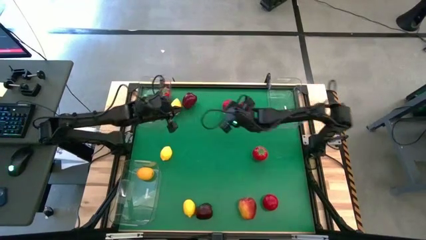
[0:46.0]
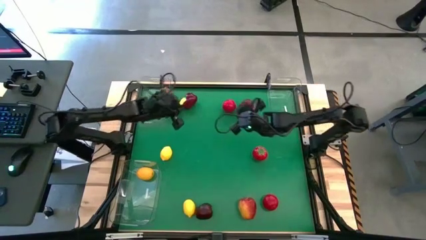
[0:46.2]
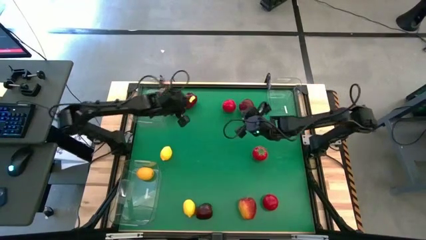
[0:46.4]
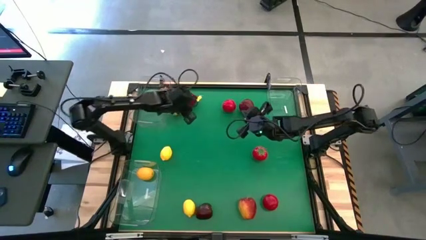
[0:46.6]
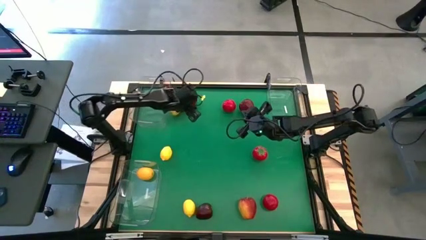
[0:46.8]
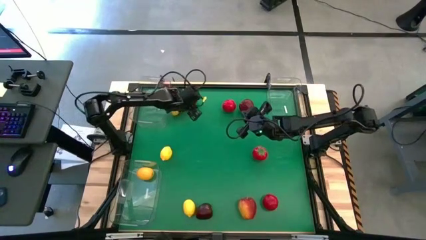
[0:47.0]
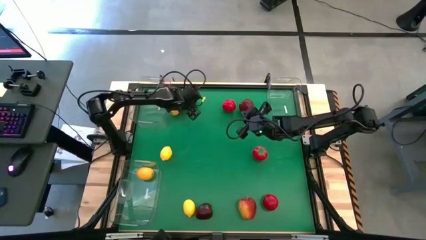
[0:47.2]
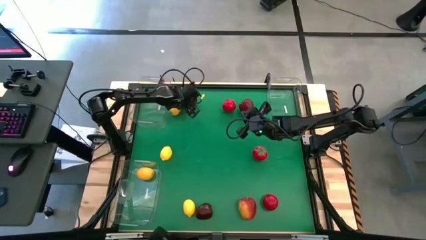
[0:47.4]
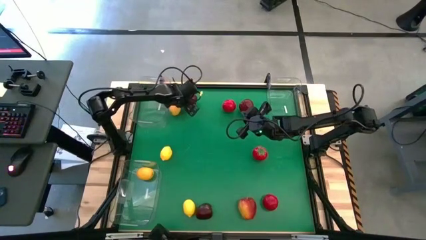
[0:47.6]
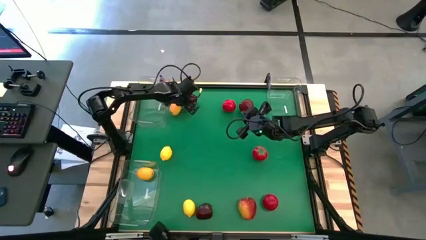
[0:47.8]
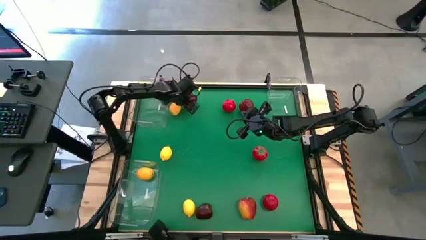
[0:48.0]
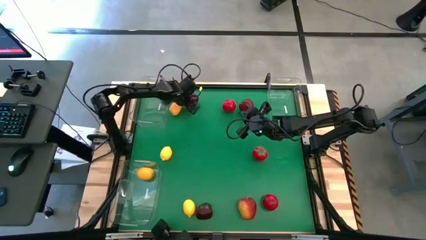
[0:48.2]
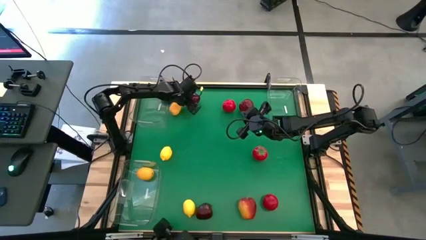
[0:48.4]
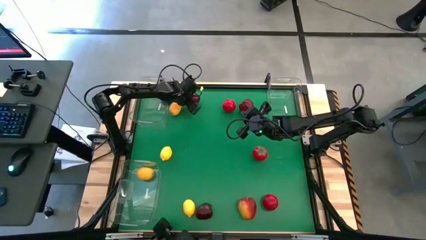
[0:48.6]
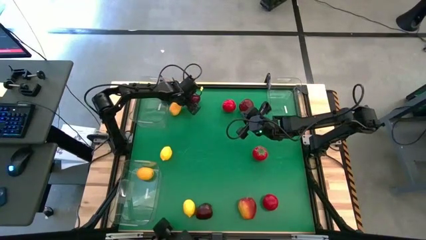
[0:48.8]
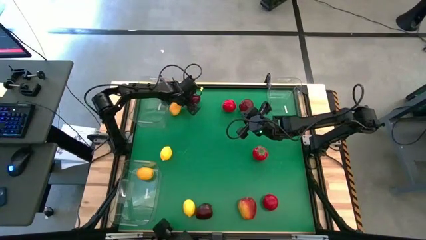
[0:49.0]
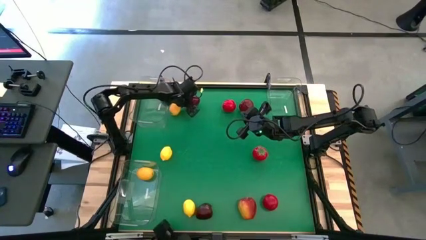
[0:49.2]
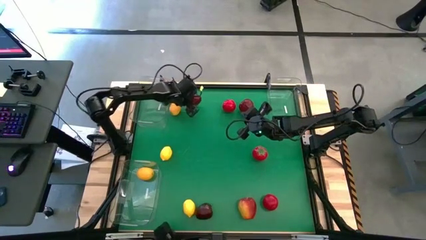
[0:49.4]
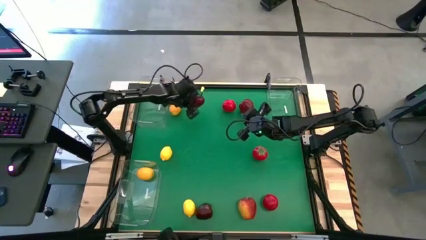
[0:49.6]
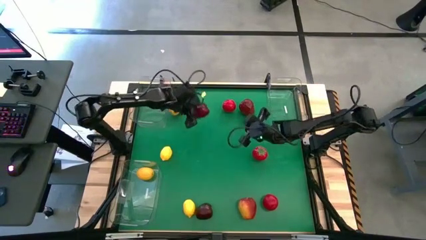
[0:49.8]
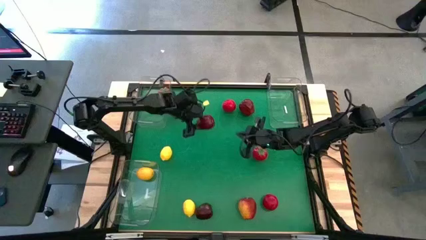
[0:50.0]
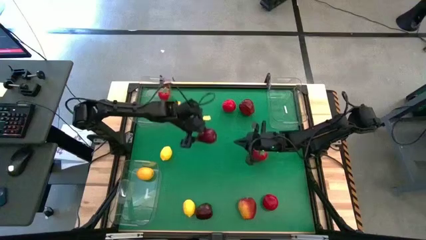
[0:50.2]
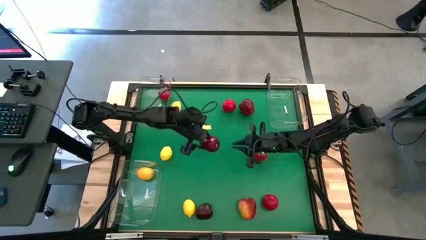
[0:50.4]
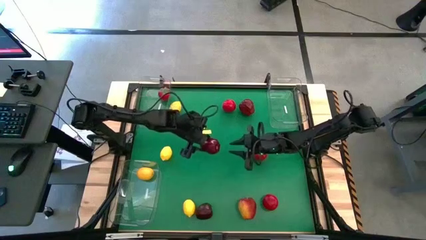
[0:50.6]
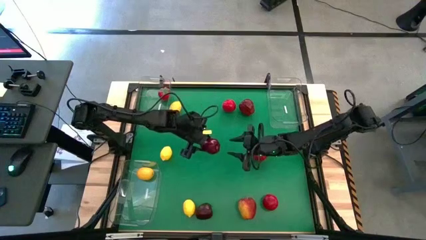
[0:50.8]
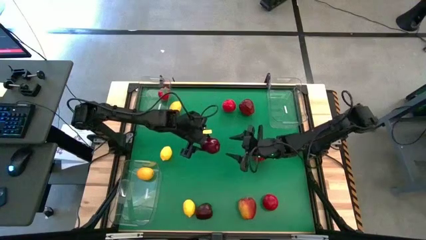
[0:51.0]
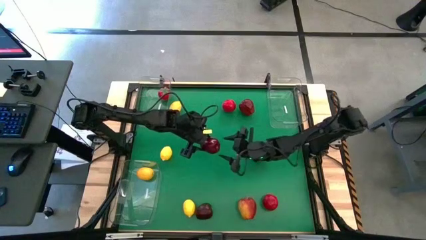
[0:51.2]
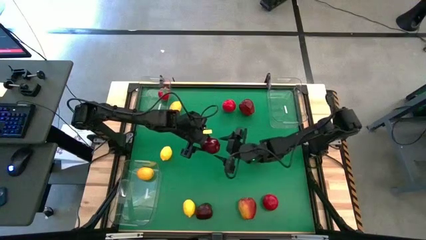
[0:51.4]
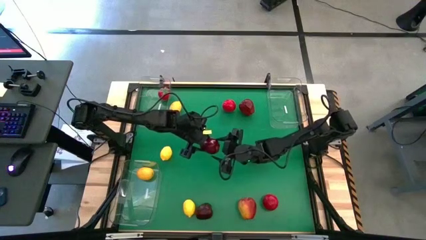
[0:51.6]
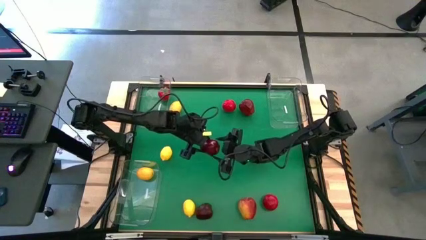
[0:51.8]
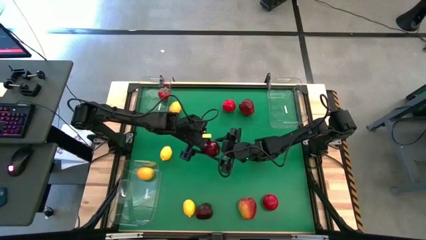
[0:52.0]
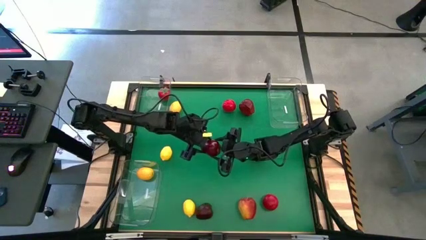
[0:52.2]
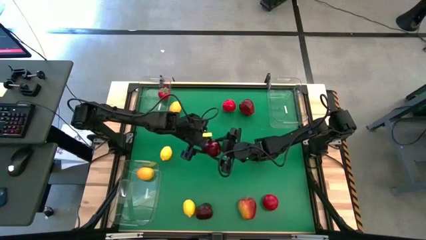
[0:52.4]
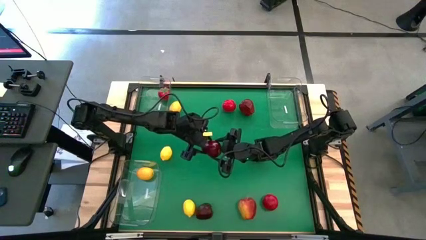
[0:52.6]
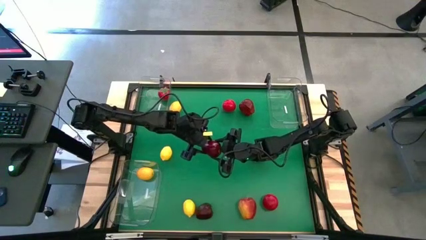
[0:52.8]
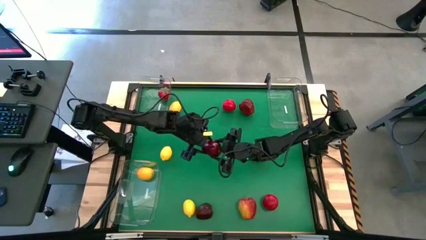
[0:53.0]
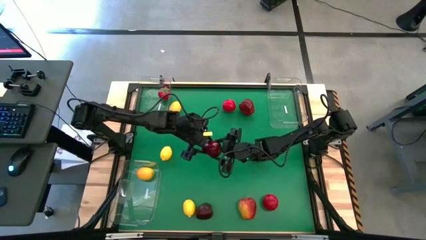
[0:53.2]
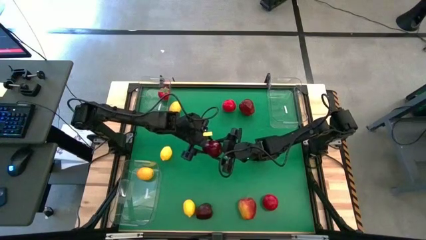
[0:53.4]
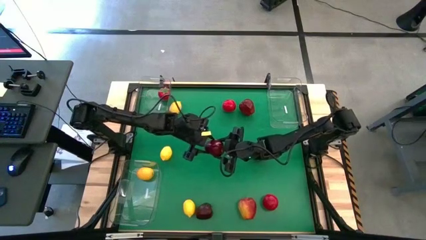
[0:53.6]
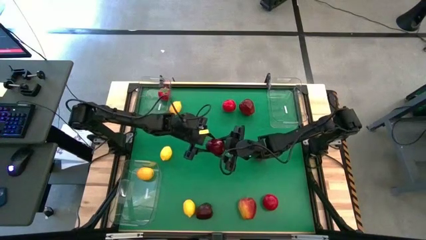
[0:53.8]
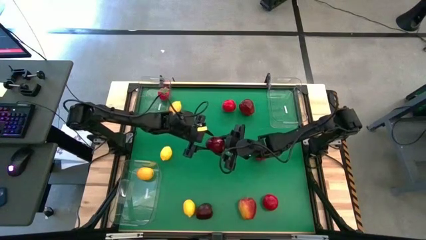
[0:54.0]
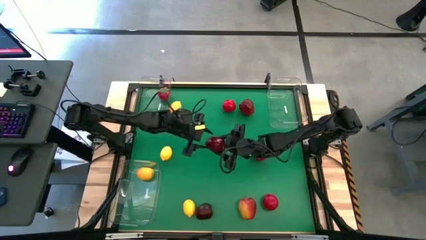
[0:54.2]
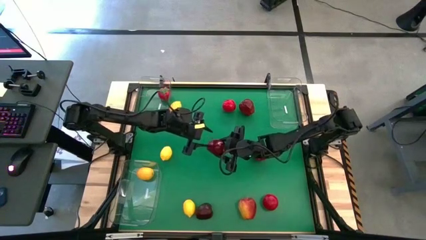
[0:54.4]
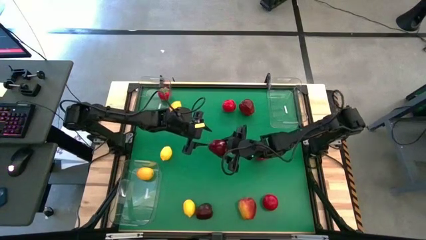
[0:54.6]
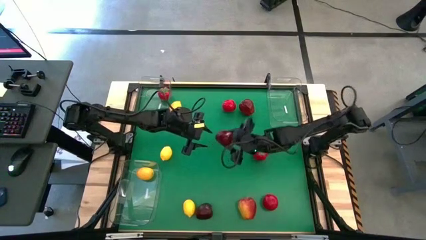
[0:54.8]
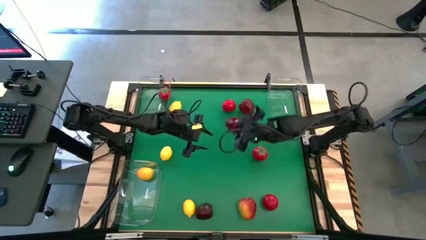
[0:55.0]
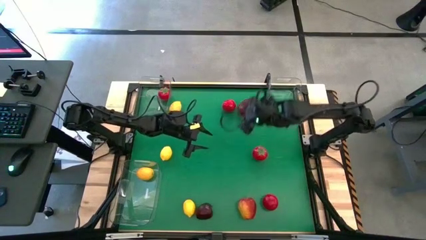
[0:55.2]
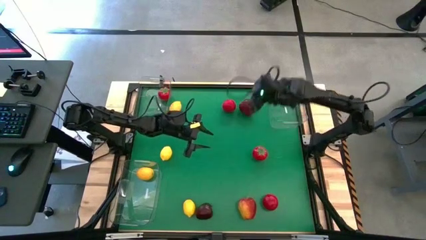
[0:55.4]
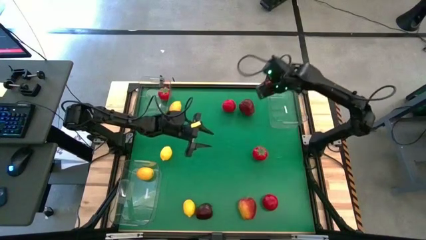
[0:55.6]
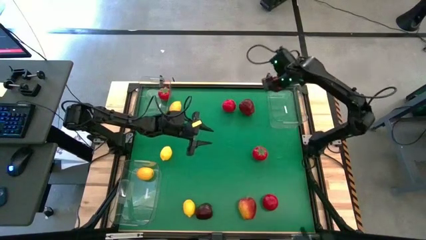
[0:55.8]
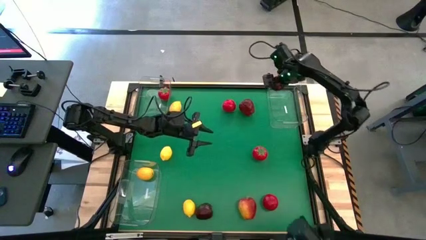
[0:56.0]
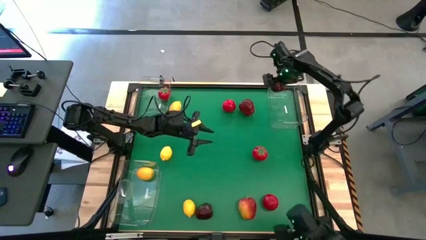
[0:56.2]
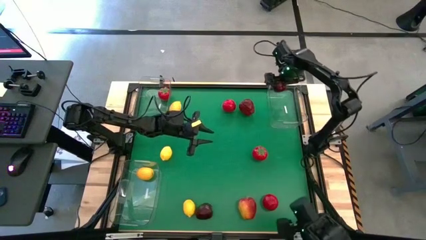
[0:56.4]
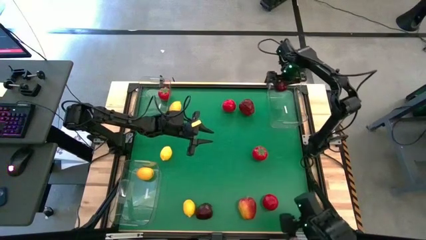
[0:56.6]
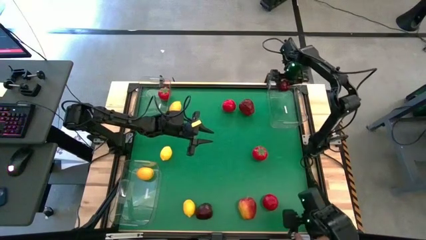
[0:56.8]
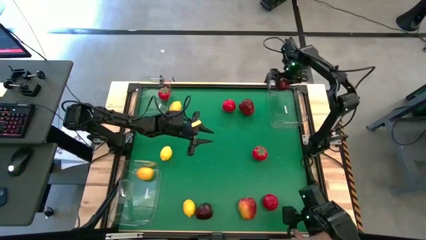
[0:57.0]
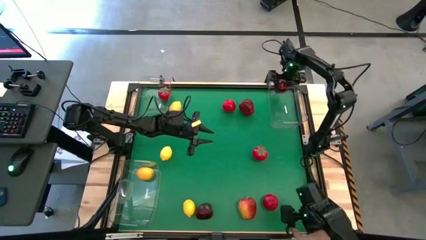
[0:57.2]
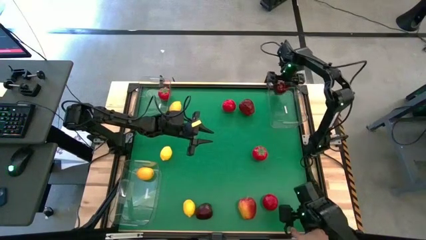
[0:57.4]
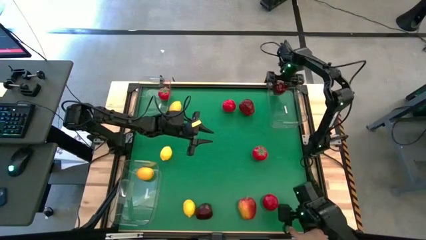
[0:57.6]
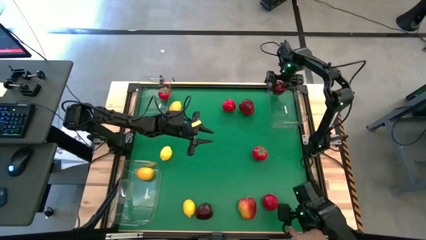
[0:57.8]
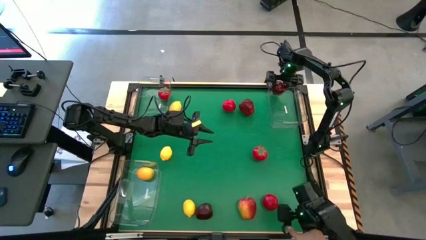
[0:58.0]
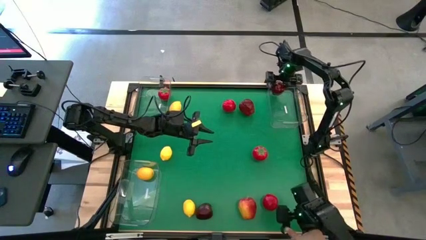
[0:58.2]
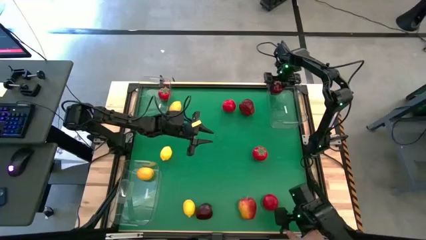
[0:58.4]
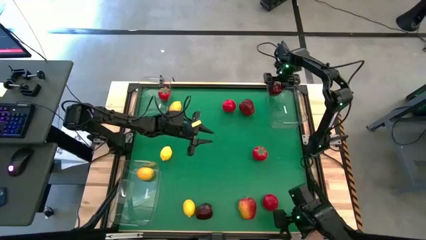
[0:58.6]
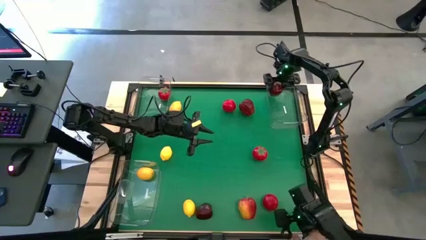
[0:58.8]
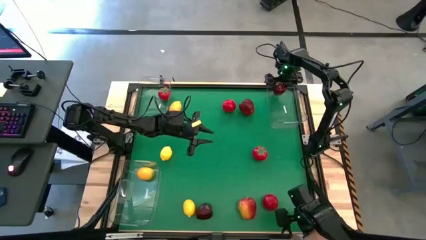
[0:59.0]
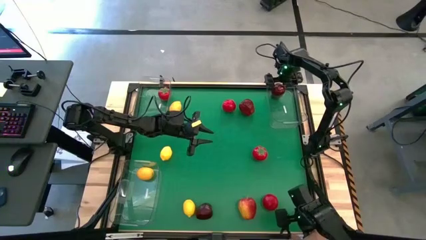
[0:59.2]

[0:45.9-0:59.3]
Task: Sort produce into baskets
Put the apple into the top right bin

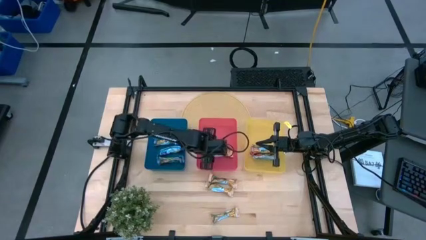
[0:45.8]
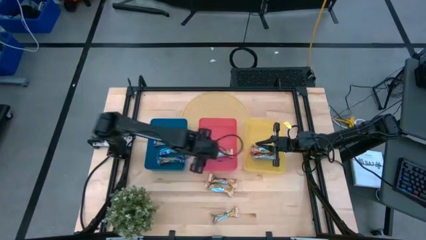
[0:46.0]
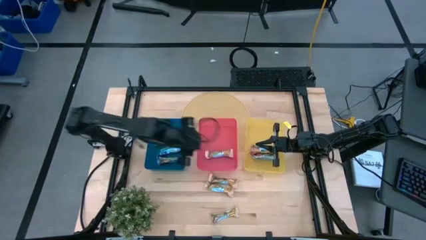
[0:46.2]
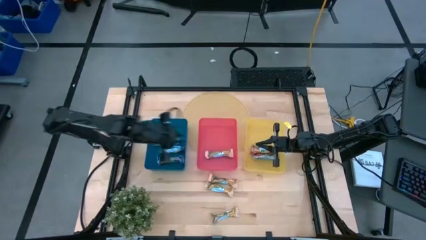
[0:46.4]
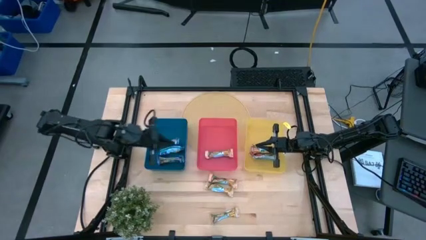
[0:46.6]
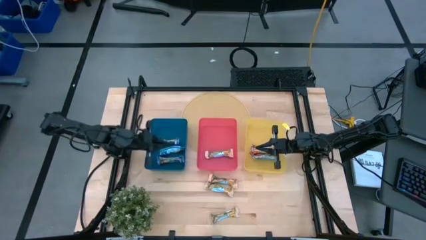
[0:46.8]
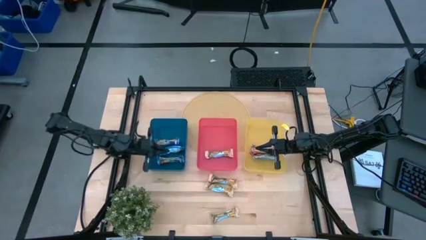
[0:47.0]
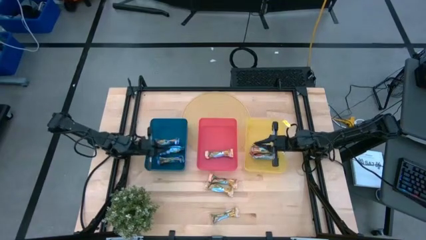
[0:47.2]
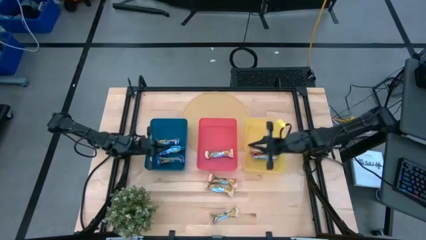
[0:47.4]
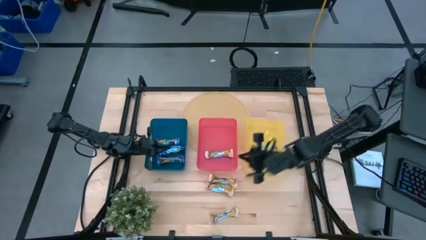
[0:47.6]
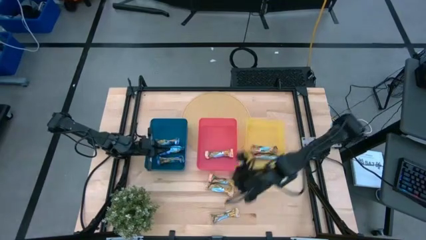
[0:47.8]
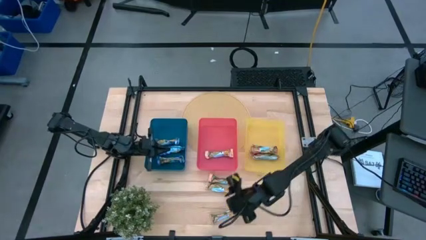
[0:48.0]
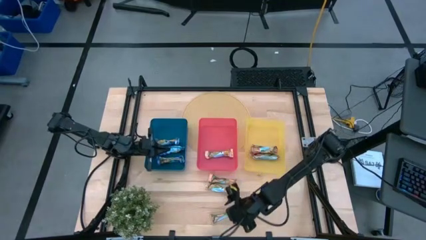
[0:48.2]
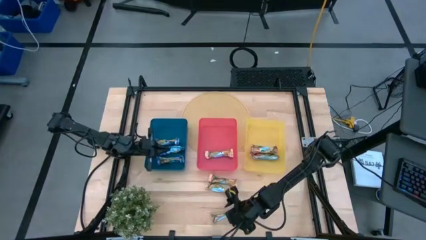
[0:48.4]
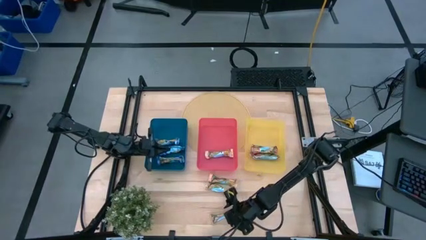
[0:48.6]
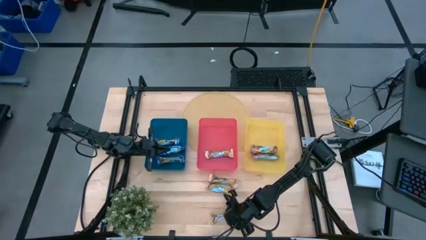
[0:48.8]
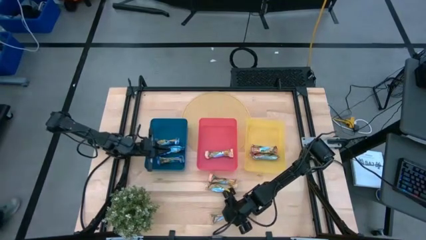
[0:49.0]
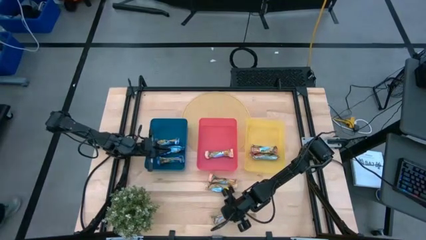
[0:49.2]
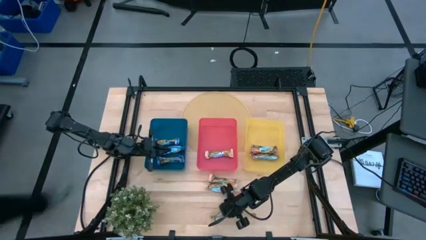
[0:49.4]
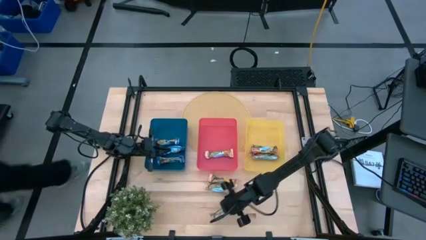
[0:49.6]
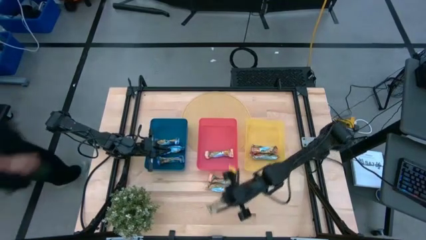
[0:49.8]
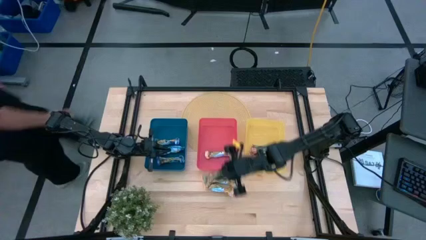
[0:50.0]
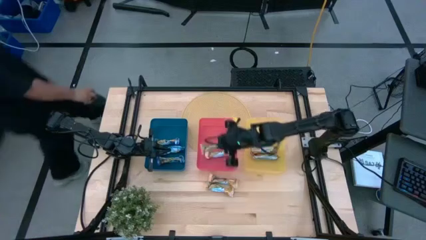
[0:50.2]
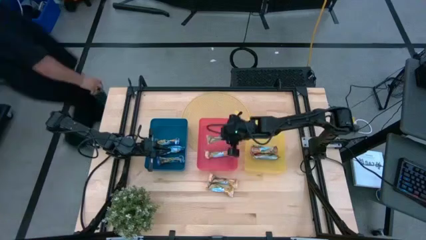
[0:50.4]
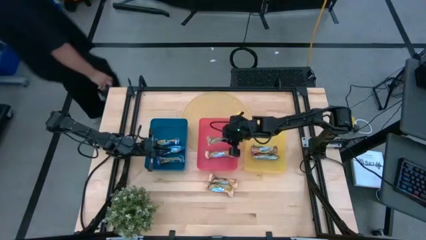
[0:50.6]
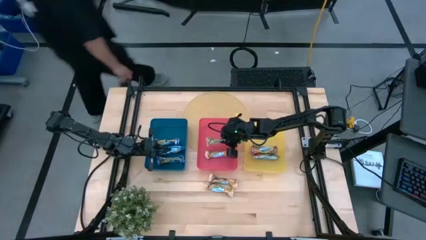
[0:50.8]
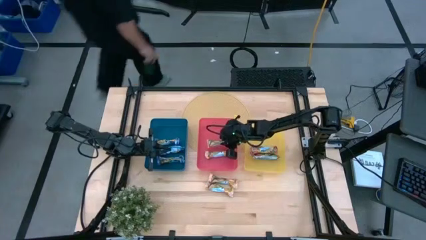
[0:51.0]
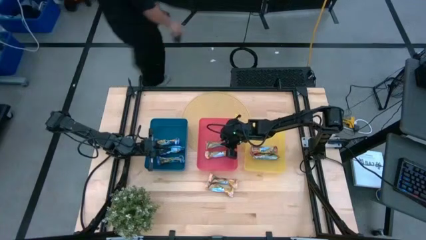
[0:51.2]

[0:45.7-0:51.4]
Task: Pick and place Granola Bars by type
Put the bottom yellow granola bar into pink bin
